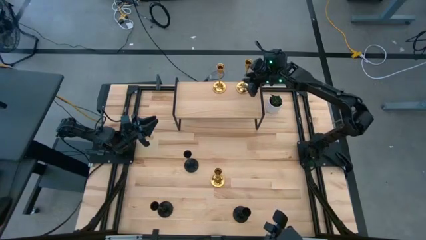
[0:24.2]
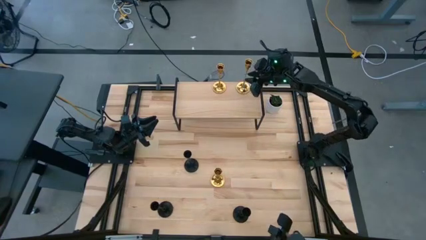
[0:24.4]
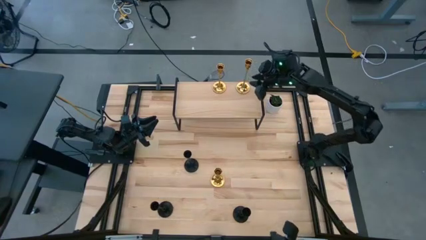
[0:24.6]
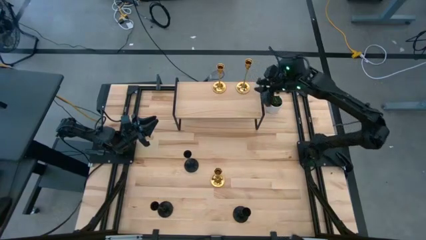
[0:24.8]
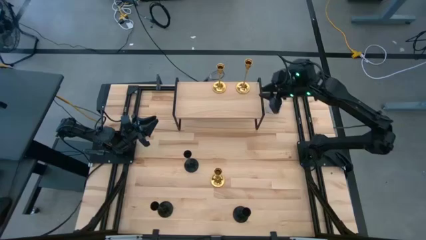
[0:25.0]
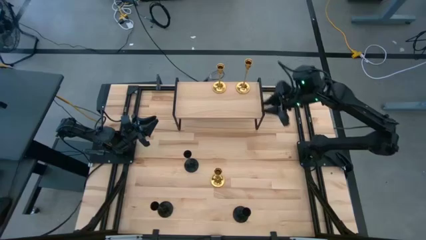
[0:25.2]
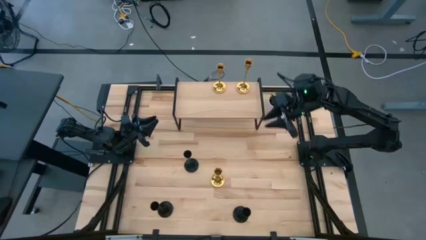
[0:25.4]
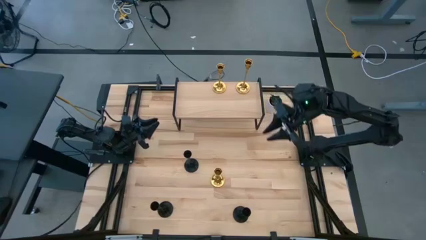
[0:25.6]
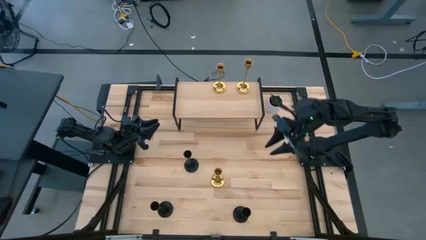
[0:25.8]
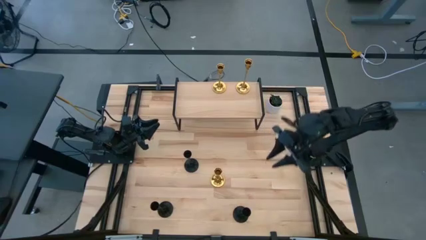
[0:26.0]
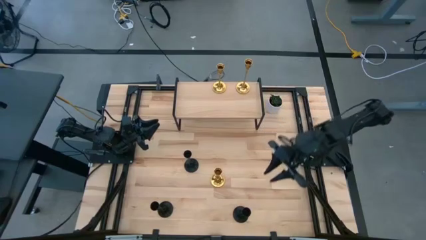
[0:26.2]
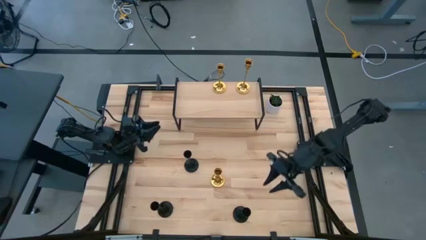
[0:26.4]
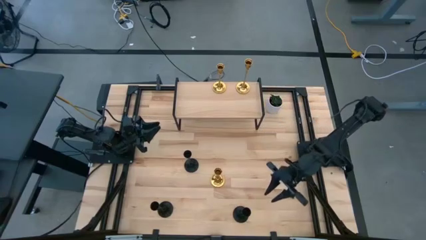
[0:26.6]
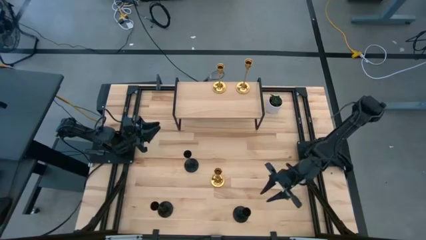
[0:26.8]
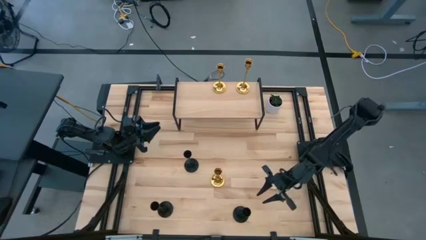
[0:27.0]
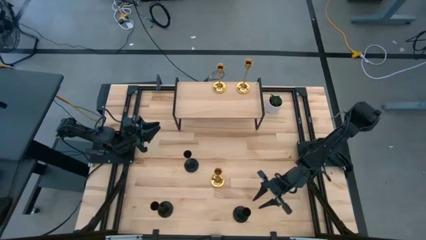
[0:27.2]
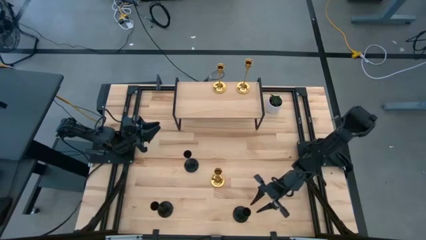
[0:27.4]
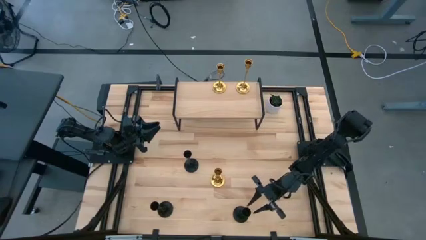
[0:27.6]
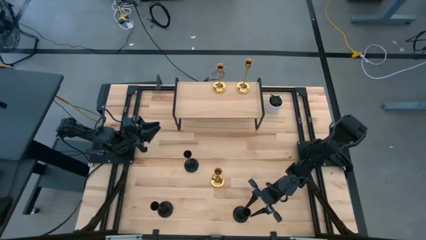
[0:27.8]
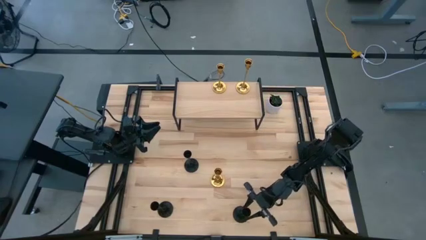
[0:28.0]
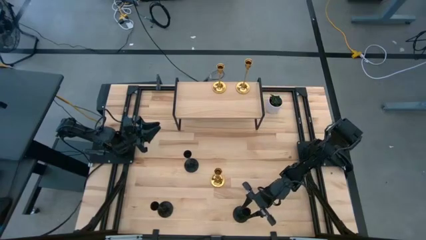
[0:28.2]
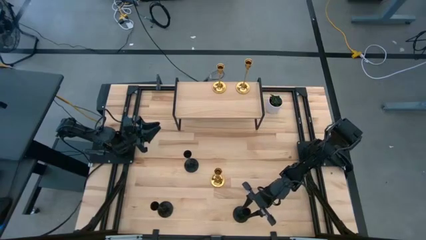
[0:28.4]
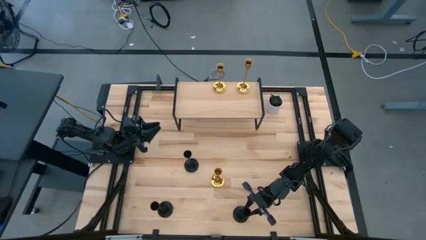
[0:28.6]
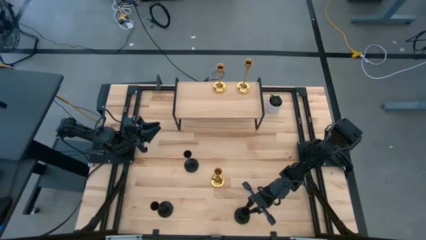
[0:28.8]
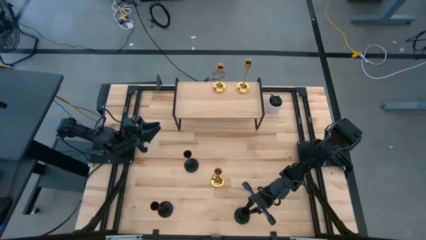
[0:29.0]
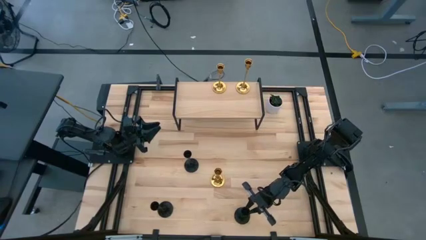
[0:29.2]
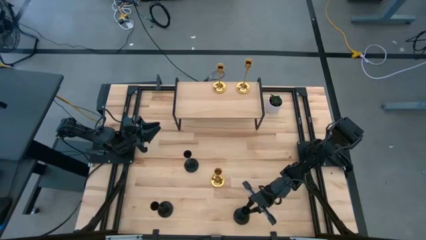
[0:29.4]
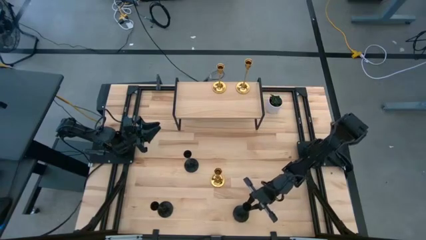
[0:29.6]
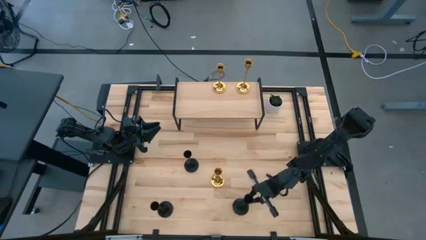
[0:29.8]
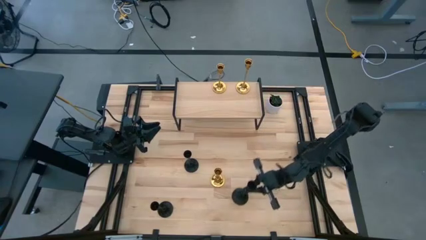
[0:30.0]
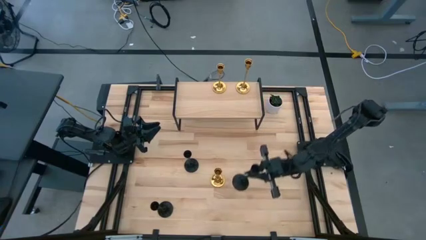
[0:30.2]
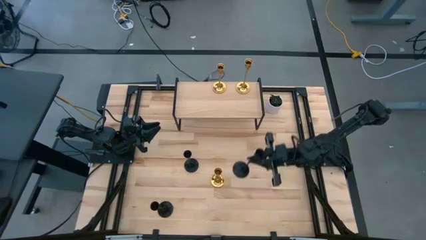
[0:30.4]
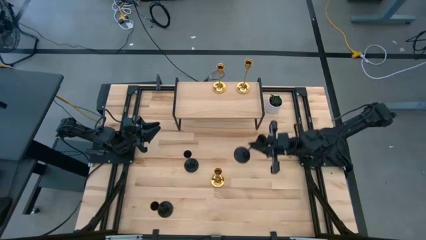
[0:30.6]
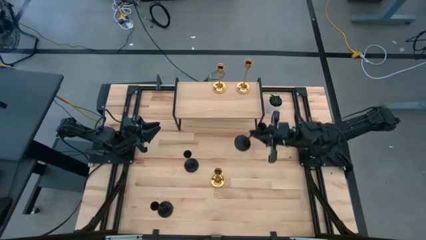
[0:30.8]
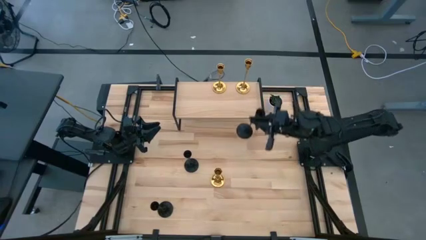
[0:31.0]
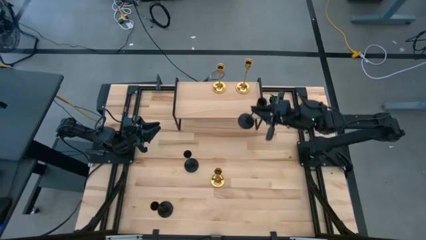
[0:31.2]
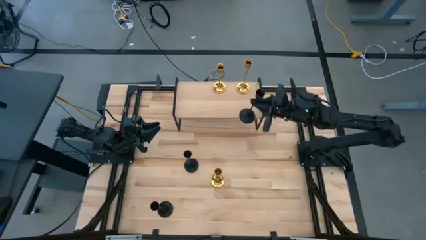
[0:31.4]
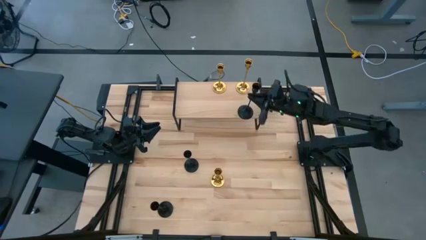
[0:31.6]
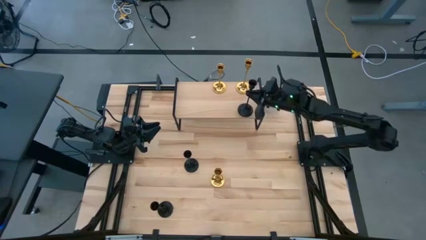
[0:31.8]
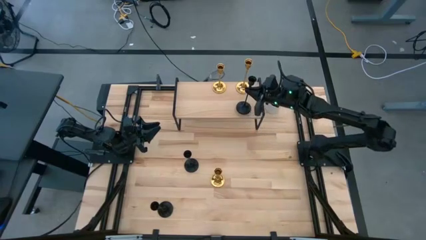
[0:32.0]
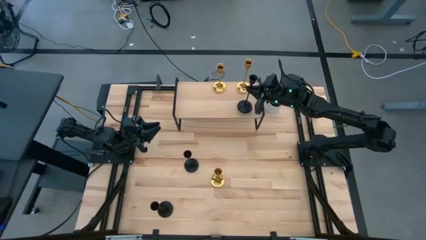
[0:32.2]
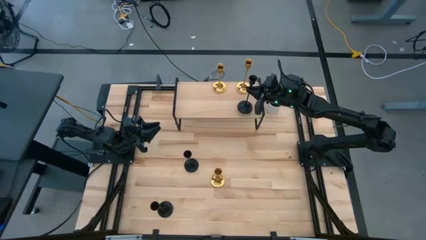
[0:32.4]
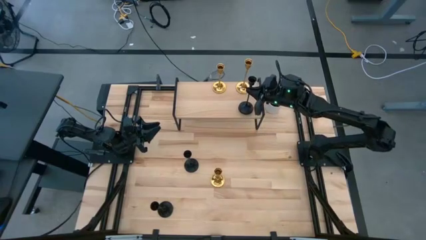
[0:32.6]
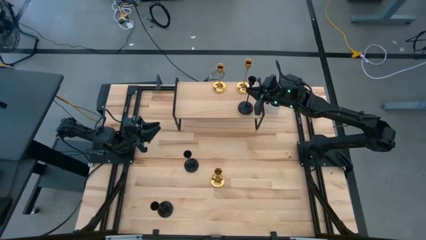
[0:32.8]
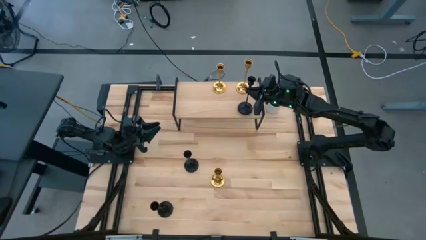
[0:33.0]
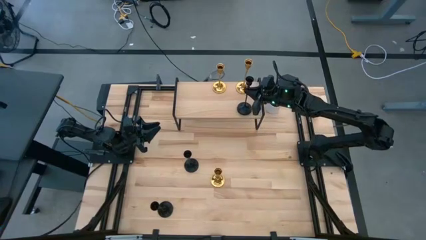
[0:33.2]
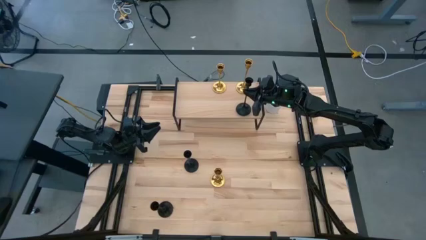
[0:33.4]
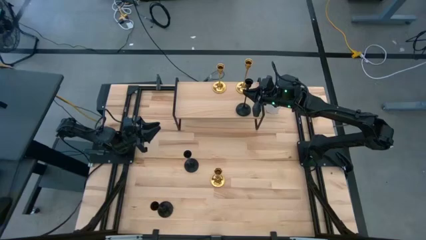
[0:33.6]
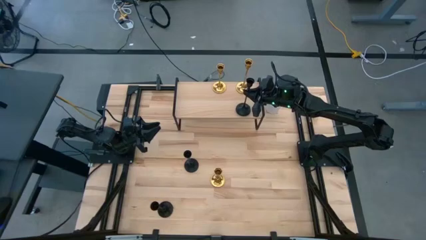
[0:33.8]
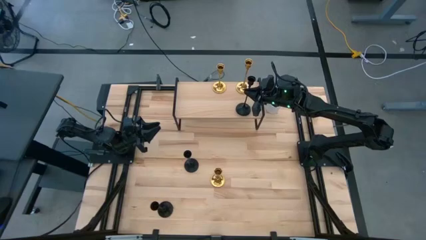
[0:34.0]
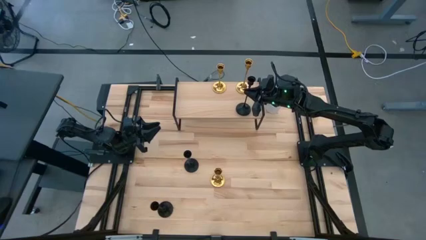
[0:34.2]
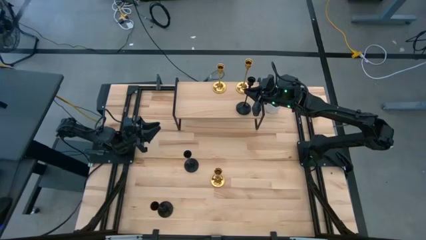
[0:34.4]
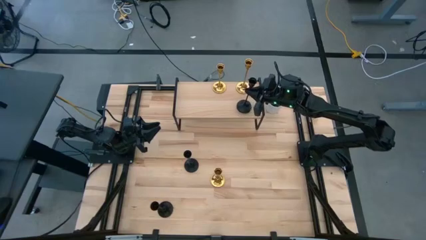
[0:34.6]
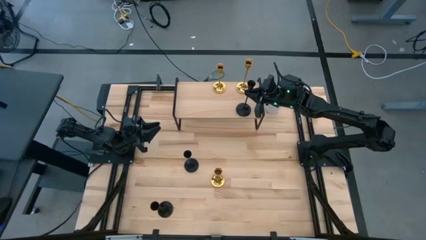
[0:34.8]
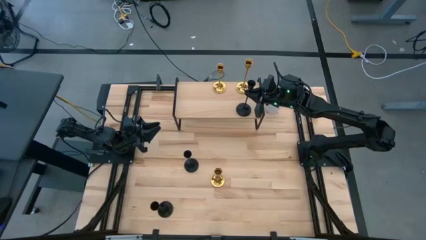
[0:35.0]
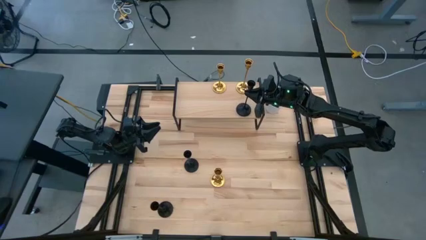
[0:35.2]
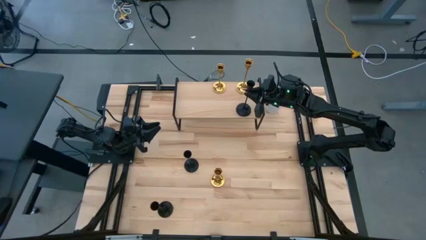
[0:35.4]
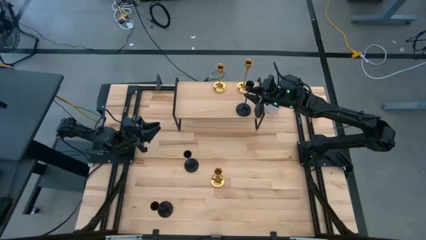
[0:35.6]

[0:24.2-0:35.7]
Task: Pick & Place candle stick holders
Put the right black candle holder on the shelf
